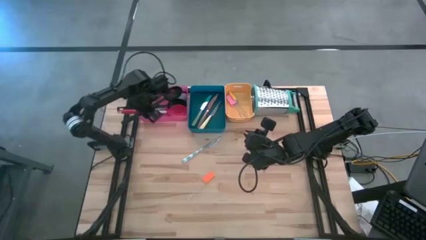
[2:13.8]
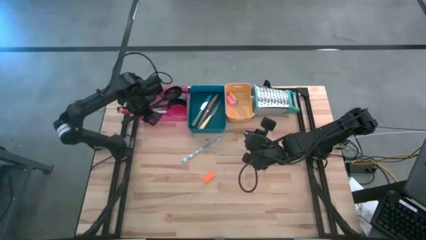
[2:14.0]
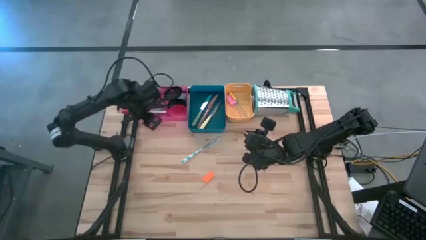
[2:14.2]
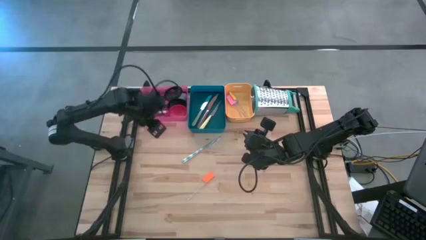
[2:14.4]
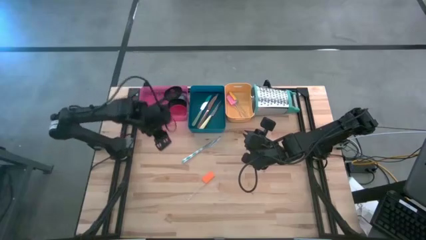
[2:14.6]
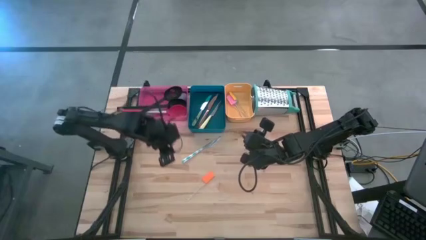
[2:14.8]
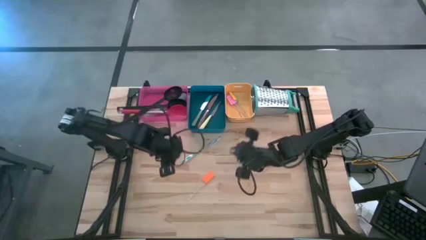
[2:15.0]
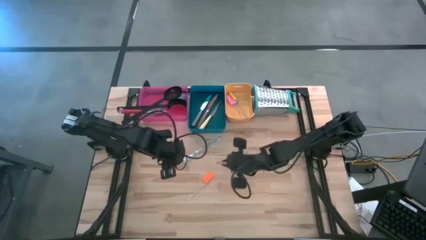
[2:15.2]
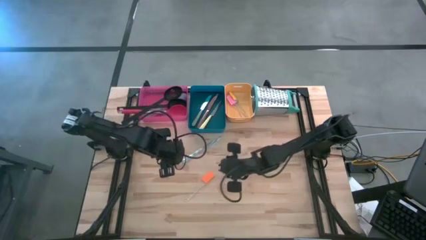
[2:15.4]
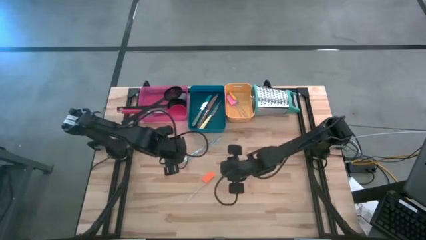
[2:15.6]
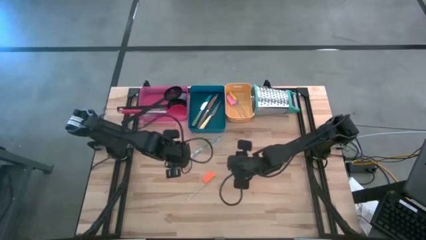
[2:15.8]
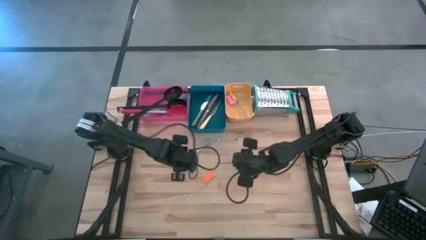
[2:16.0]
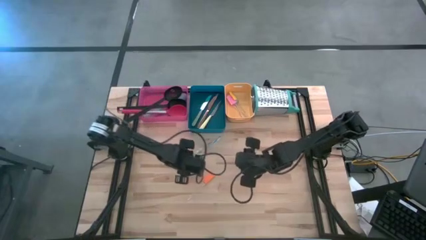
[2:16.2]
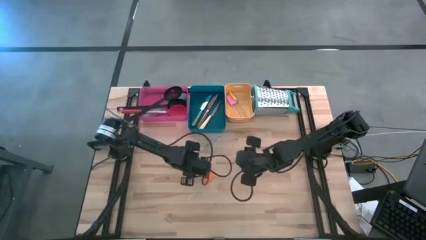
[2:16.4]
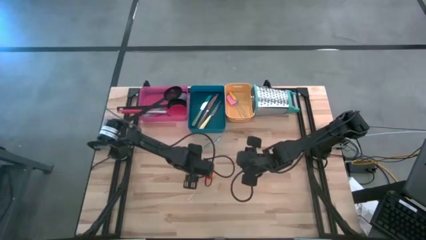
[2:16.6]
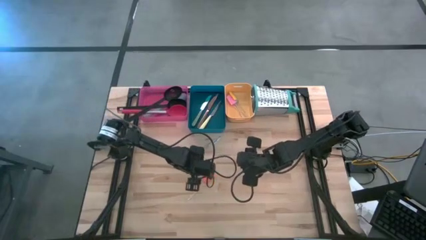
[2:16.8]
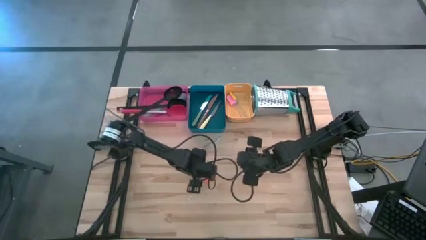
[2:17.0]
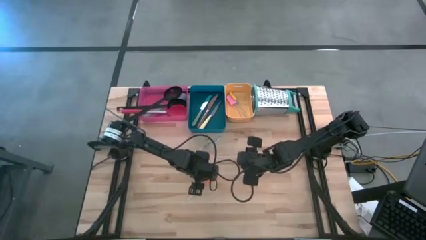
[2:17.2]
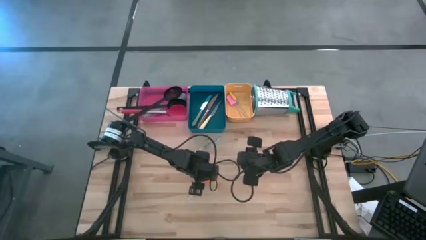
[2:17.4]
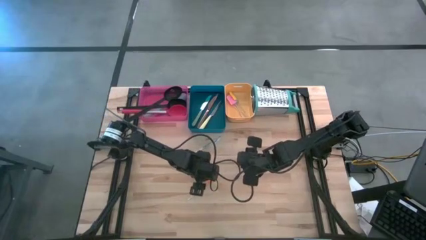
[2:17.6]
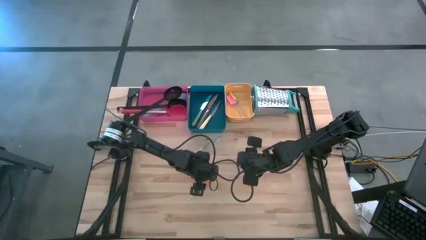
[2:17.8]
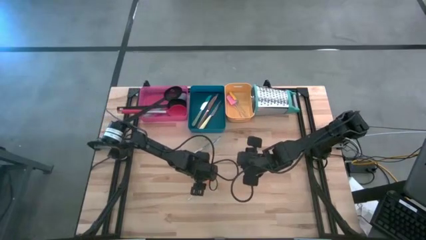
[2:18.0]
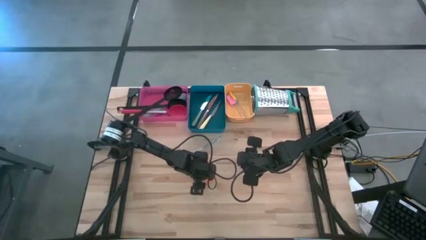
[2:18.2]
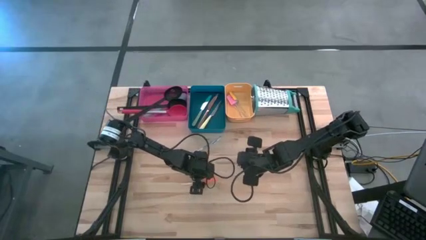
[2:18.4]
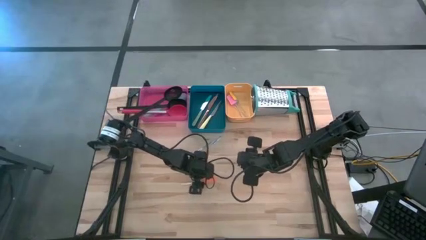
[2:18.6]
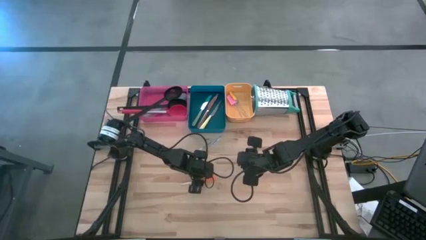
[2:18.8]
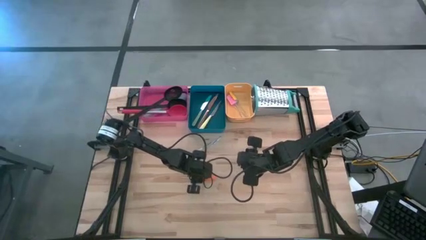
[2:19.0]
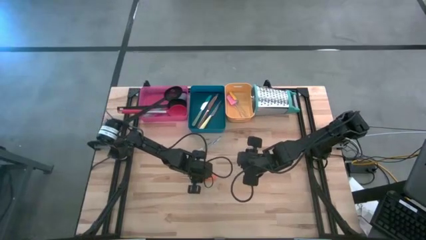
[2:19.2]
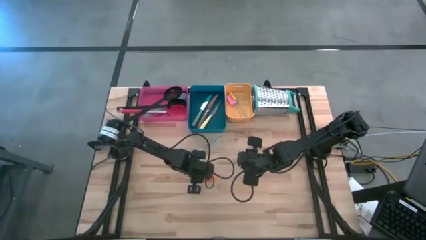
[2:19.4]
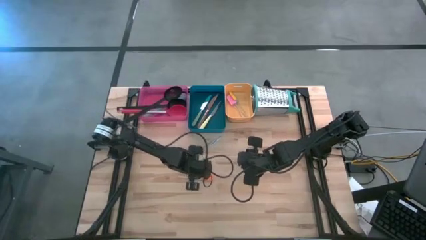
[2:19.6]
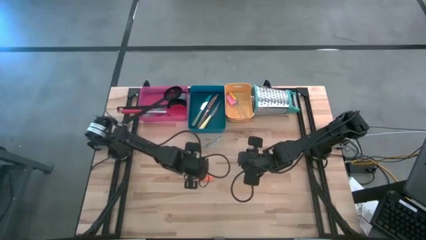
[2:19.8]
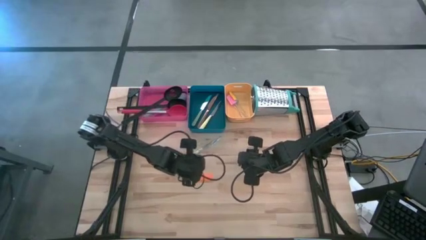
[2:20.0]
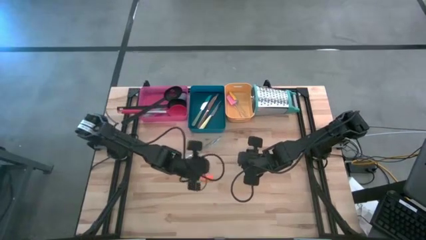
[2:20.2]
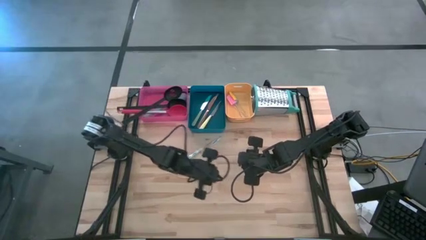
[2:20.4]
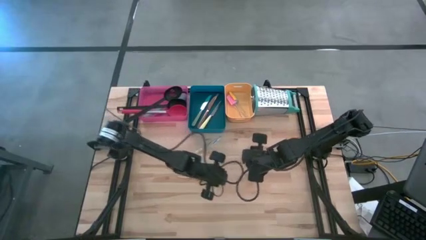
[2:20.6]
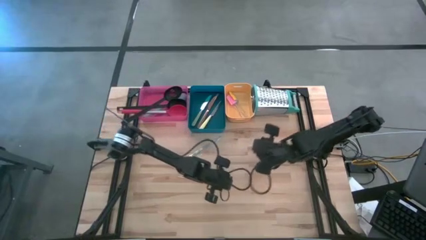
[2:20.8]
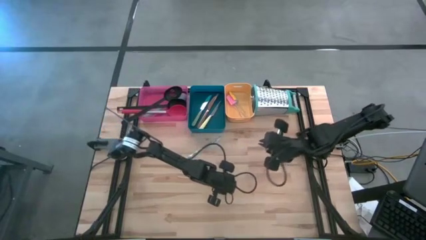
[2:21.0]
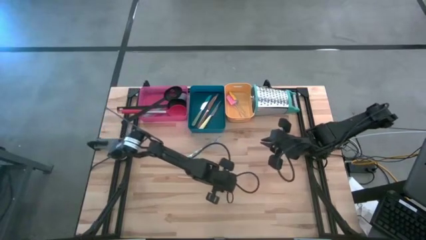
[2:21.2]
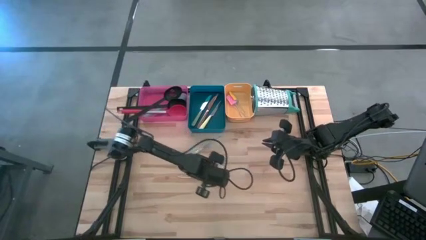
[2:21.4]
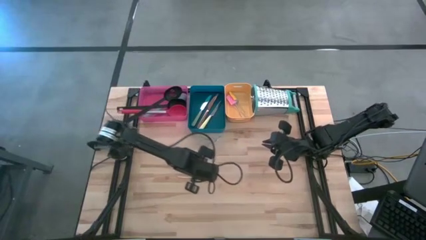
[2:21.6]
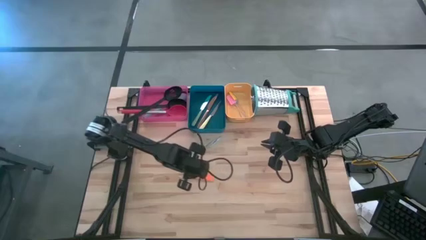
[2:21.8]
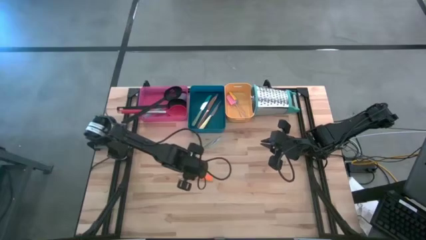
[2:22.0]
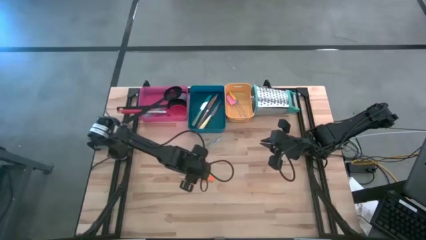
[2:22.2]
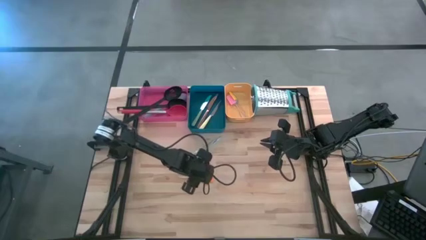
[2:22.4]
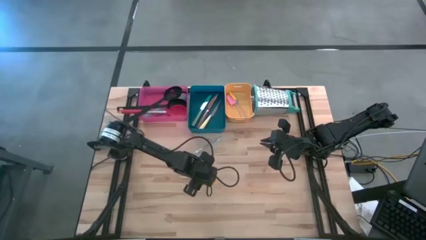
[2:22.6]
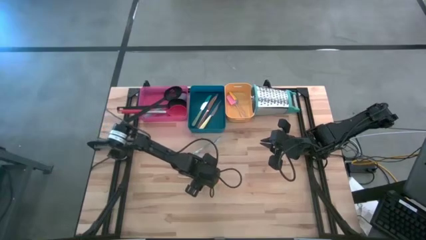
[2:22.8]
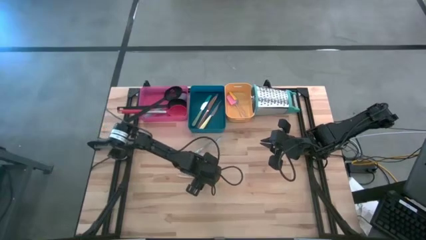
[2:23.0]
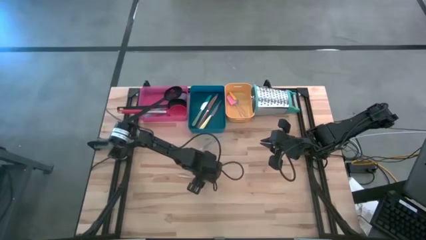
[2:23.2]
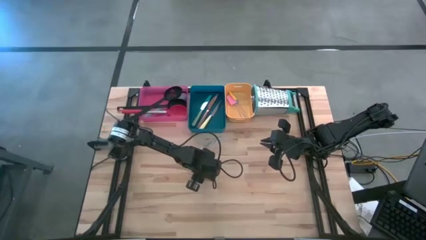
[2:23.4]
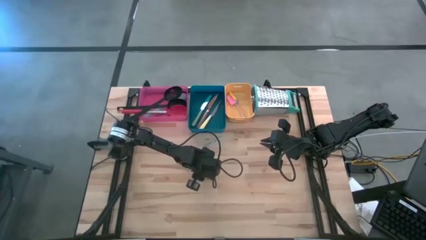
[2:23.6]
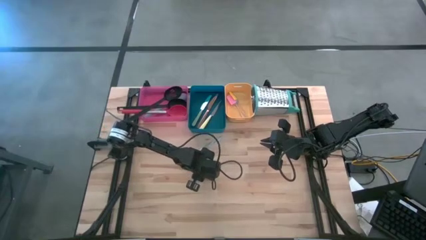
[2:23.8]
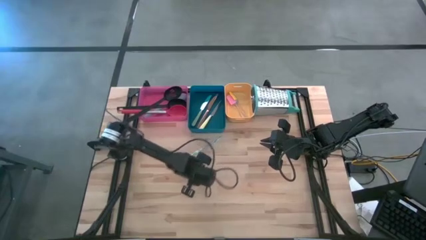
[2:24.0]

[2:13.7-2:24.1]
Task: Pick & Place Kitchen Items
Put the orange spatula into the yellow bin

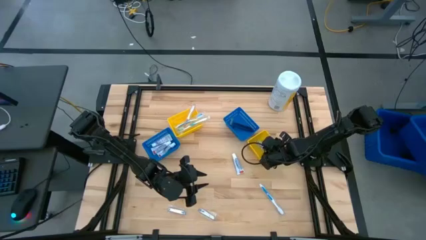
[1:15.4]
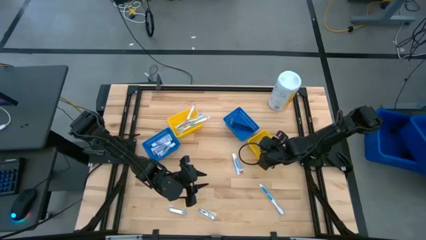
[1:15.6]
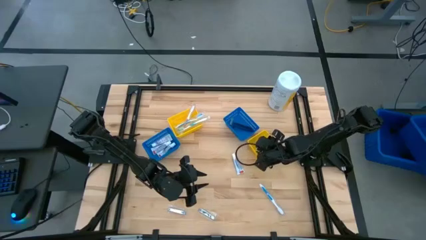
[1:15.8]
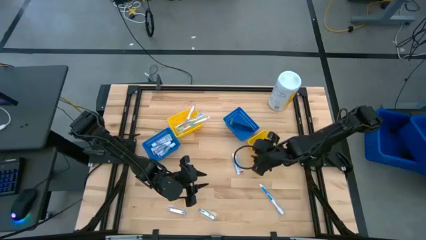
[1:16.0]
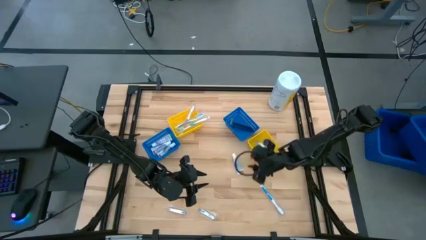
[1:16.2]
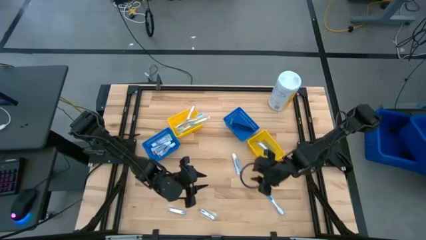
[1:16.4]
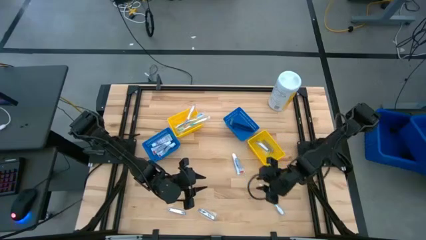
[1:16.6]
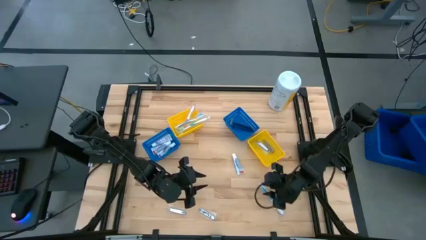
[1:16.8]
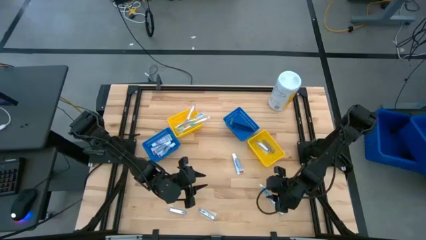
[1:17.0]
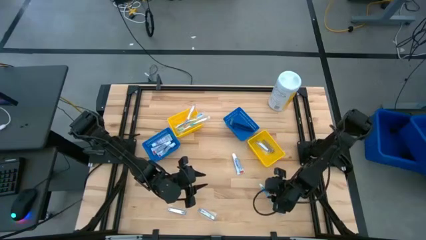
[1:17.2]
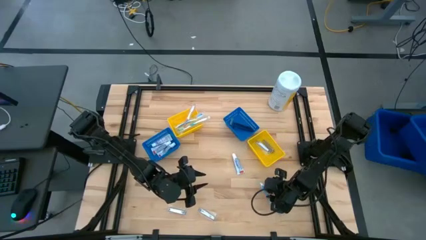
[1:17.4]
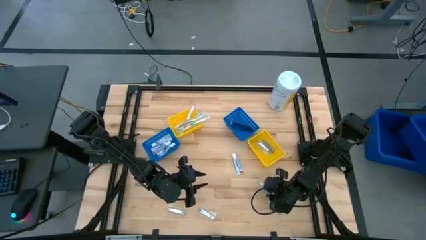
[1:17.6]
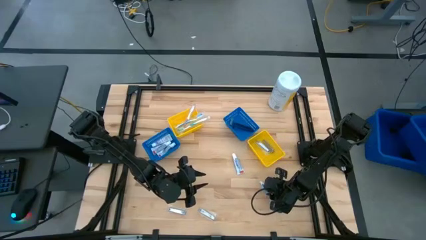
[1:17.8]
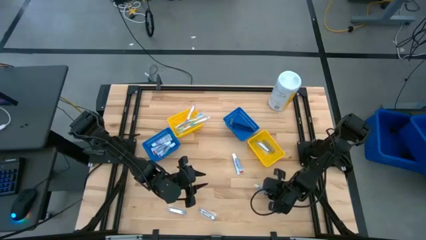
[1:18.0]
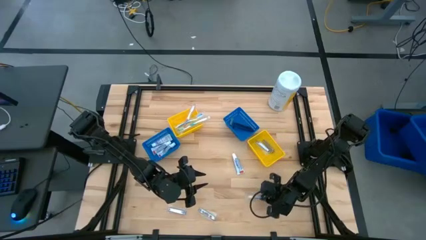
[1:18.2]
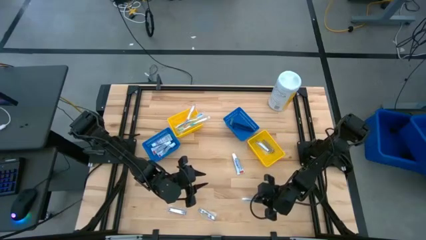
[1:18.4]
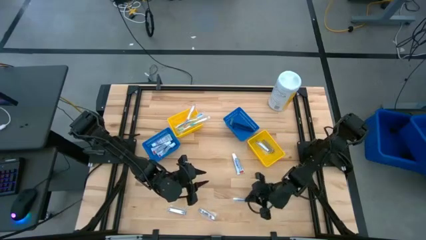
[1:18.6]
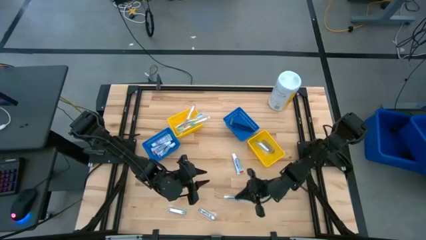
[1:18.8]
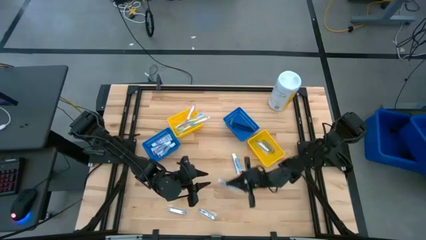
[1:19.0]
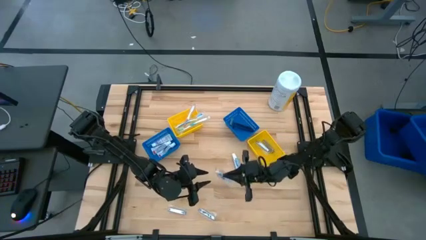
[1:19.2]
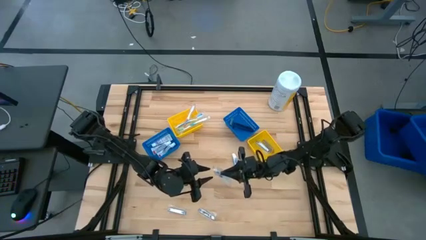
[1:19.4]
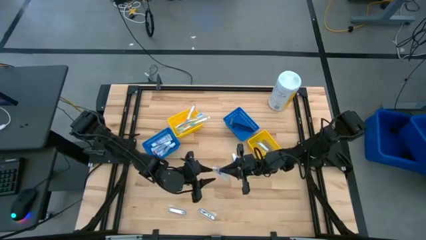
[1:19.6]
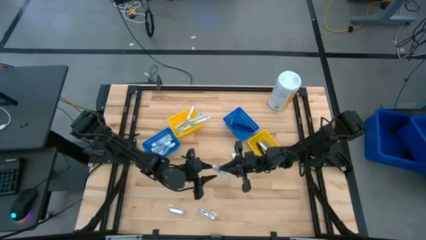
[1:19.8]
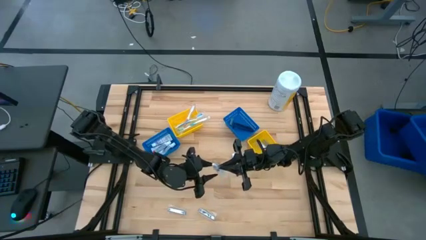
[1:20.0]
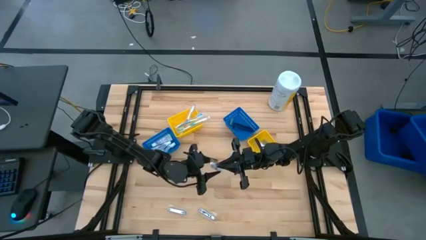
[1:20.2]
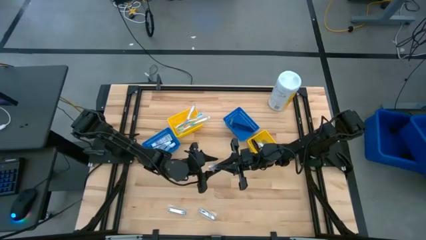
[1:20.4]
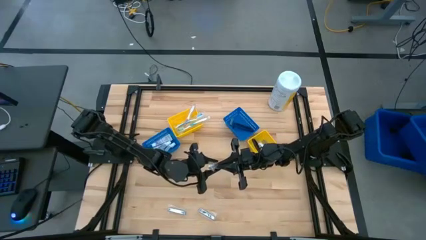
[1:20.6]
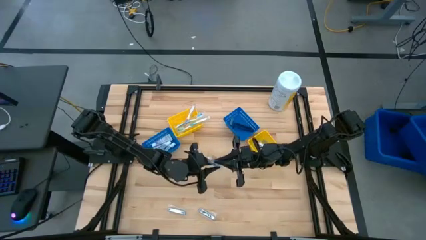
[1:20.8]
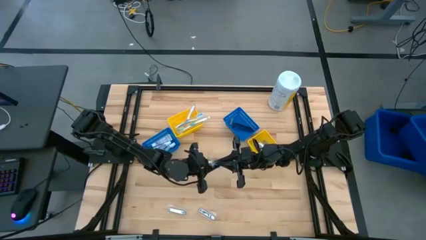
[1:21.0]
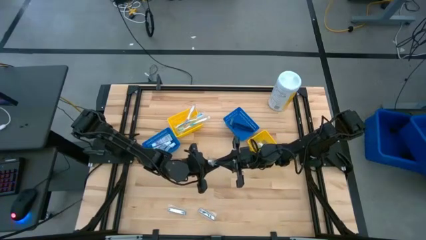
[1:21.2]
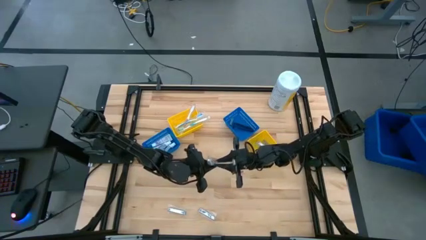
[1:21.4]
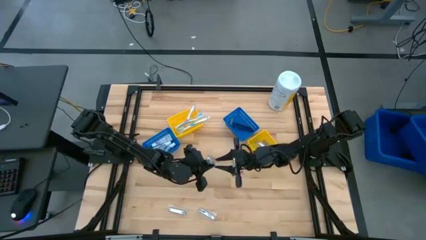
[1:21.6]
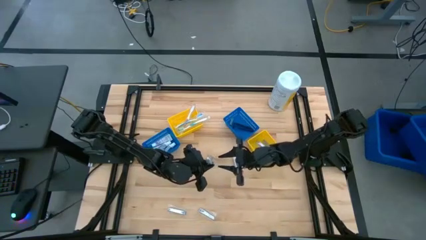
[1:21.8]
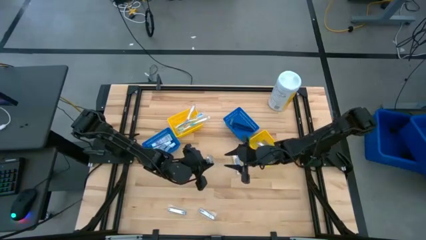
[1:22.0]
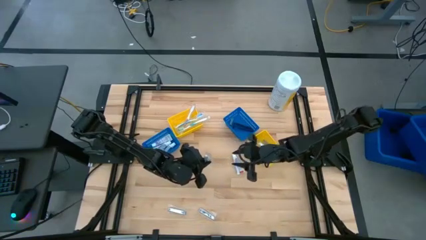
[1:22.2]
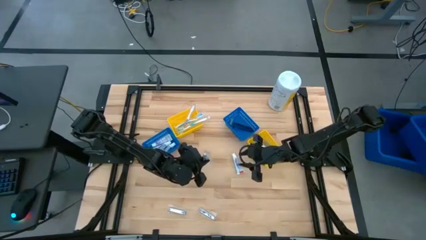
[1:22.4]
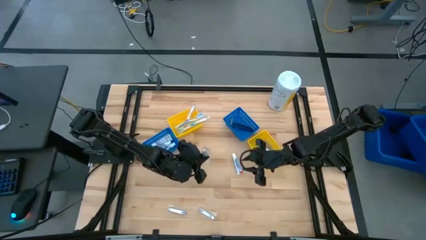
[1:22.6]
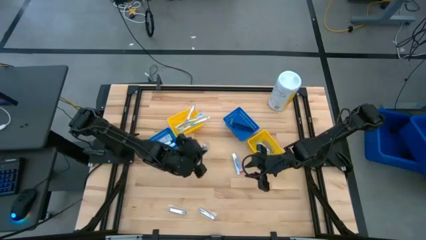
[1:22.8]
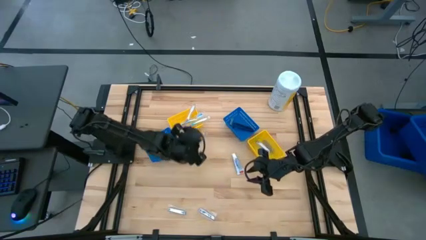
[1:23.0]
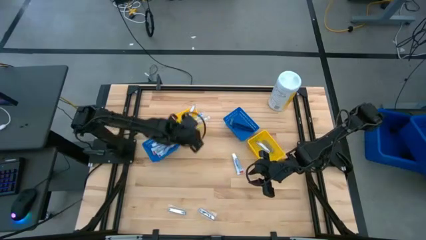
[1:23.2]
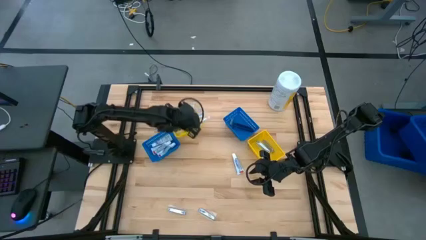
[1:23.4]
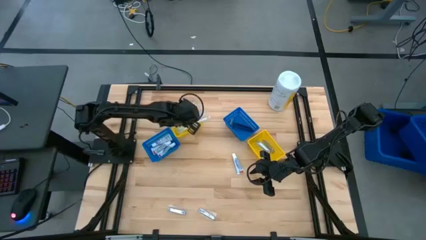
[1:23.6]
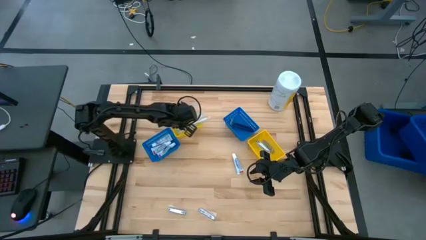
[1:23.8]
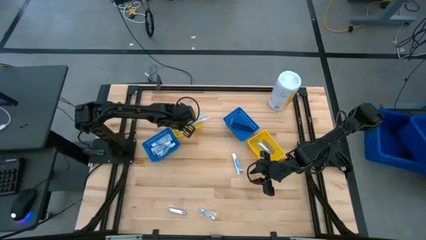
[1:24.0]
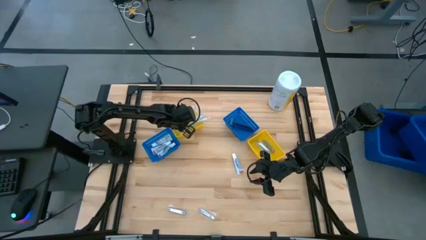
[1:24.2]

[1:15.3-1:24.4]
Task: Pick & Place Travel size toiletries
Put the blue toothbrush into the left yellow bin
